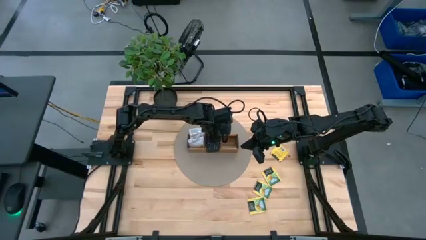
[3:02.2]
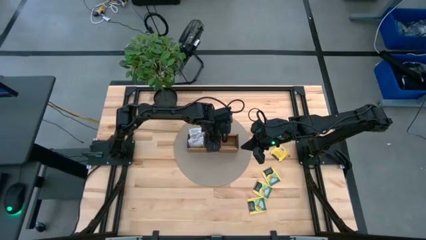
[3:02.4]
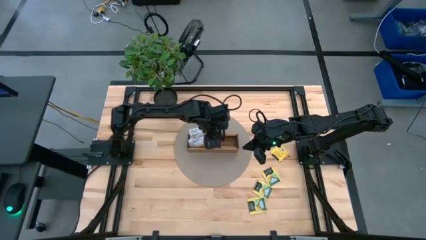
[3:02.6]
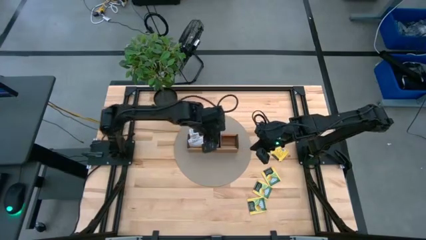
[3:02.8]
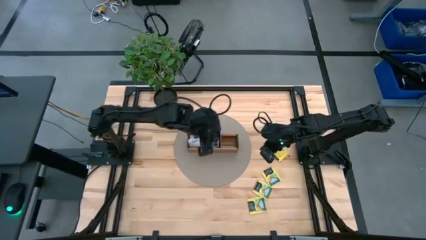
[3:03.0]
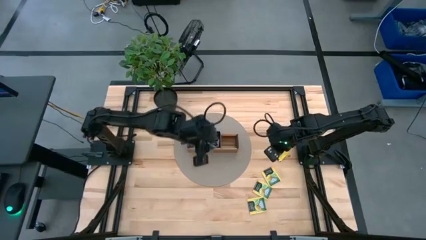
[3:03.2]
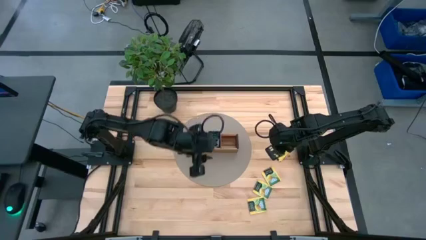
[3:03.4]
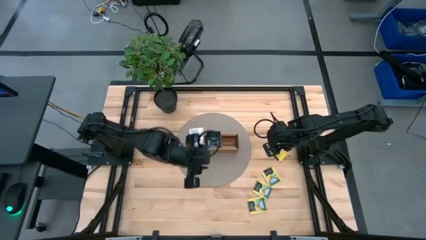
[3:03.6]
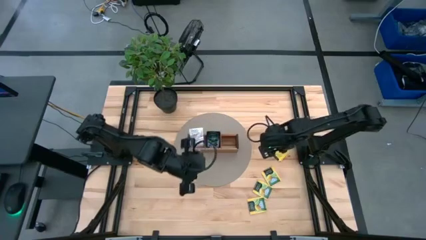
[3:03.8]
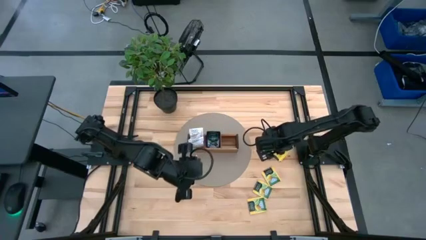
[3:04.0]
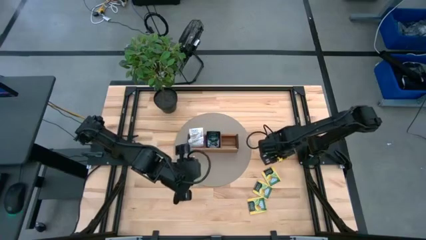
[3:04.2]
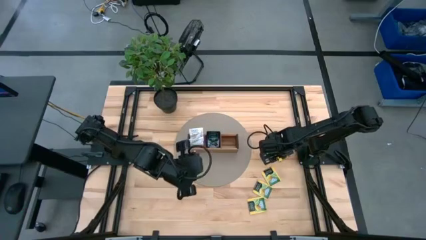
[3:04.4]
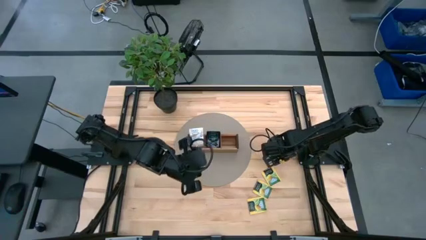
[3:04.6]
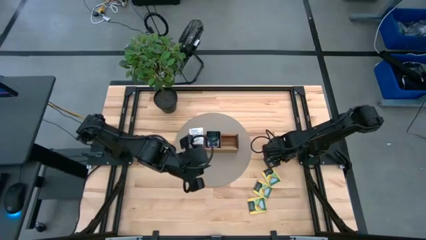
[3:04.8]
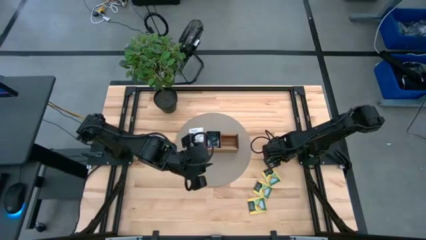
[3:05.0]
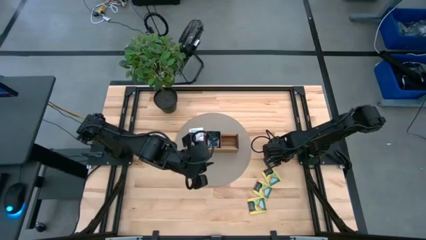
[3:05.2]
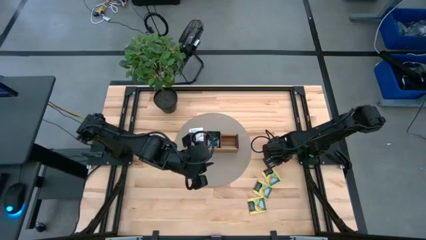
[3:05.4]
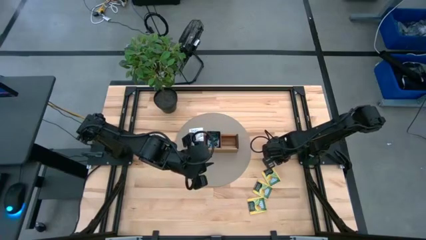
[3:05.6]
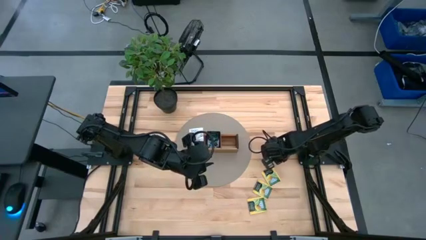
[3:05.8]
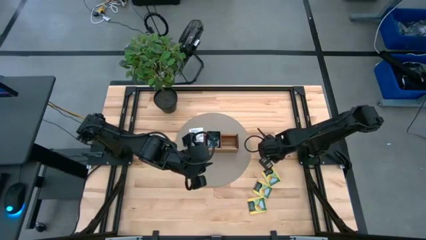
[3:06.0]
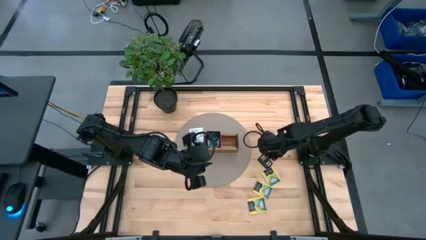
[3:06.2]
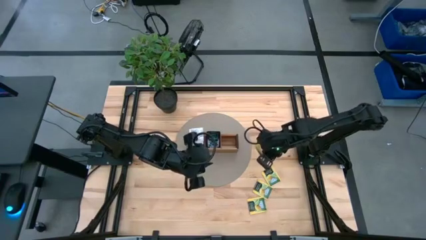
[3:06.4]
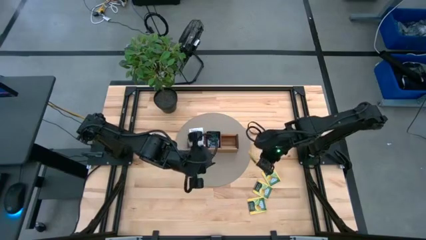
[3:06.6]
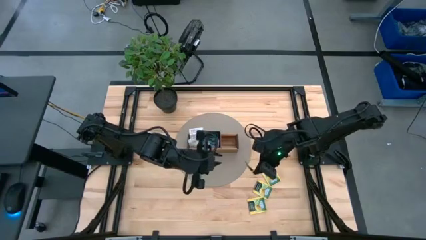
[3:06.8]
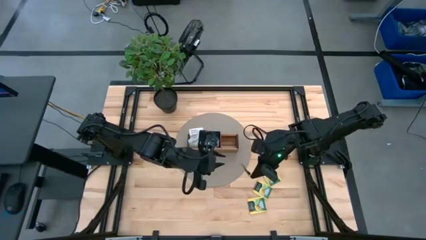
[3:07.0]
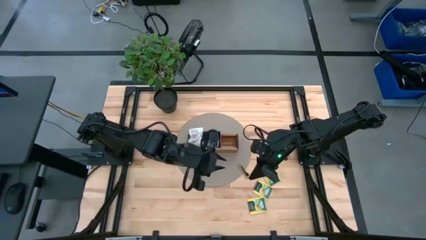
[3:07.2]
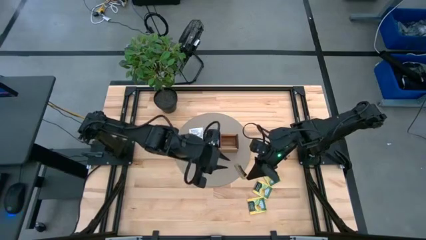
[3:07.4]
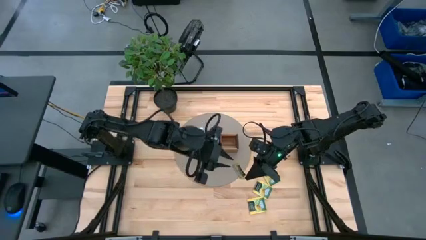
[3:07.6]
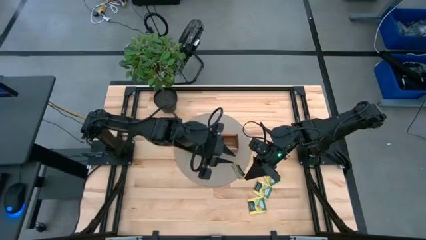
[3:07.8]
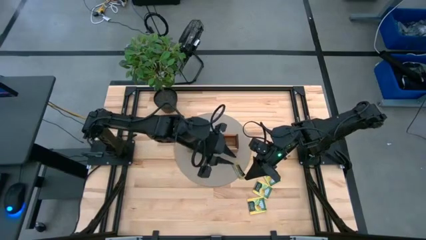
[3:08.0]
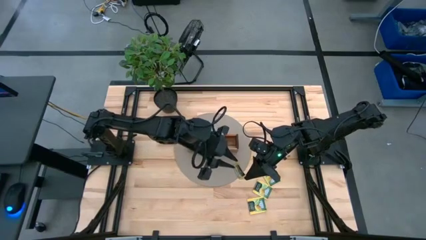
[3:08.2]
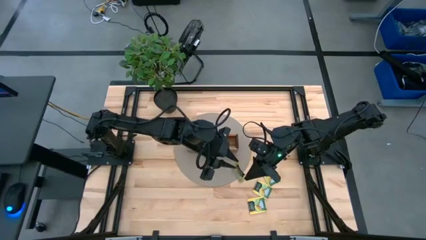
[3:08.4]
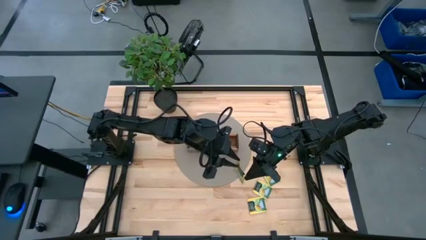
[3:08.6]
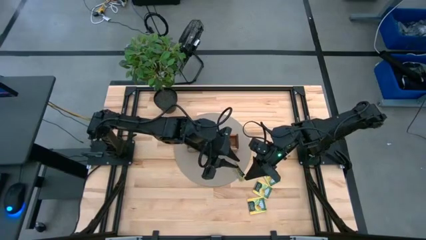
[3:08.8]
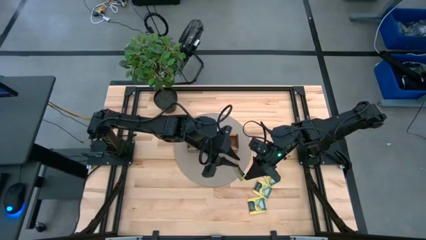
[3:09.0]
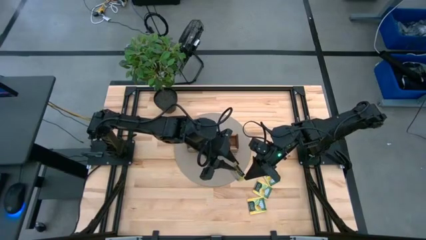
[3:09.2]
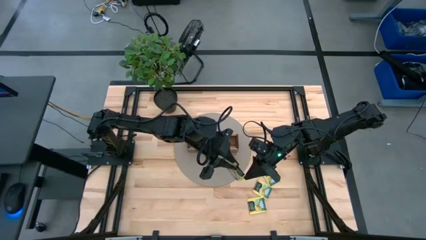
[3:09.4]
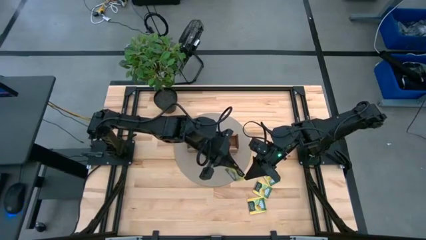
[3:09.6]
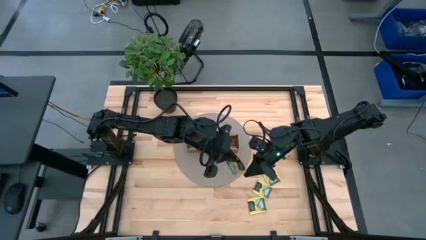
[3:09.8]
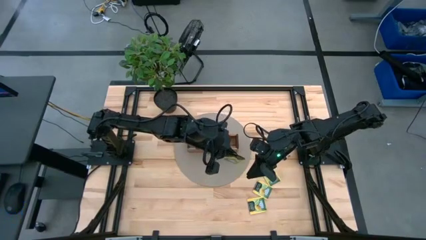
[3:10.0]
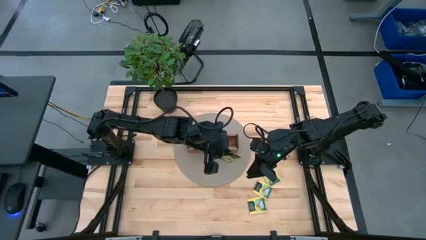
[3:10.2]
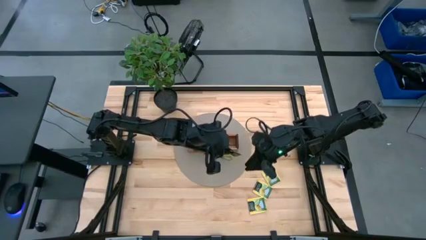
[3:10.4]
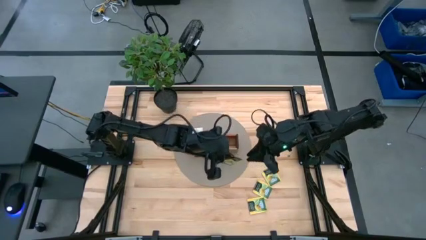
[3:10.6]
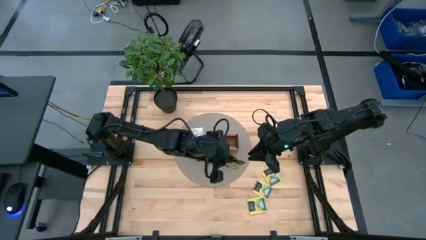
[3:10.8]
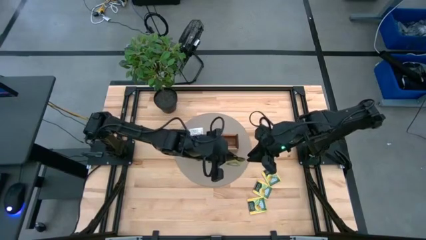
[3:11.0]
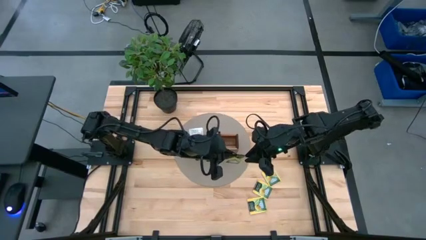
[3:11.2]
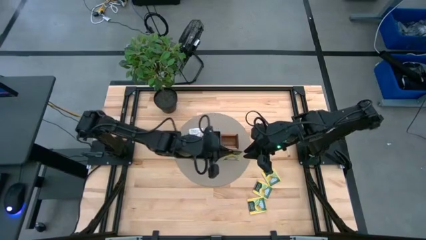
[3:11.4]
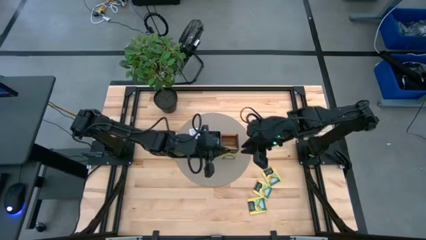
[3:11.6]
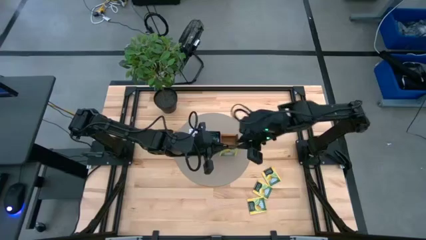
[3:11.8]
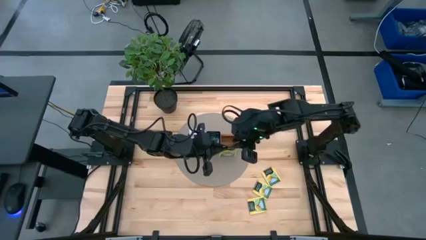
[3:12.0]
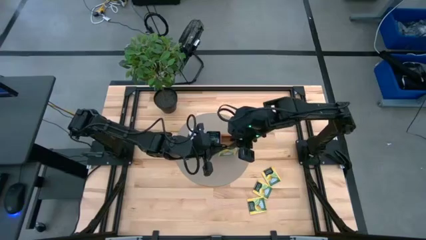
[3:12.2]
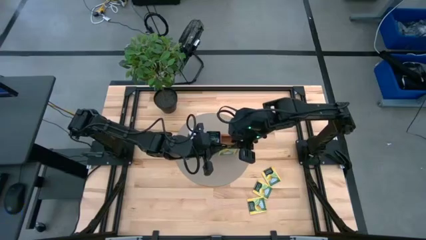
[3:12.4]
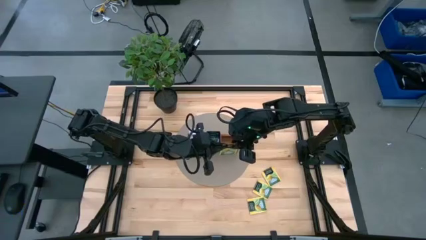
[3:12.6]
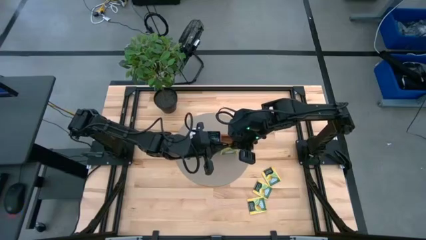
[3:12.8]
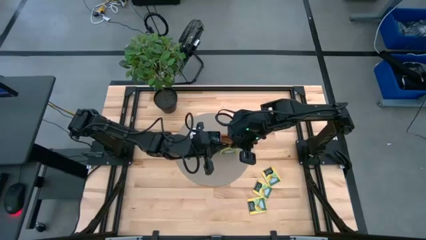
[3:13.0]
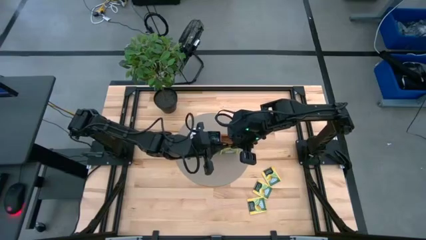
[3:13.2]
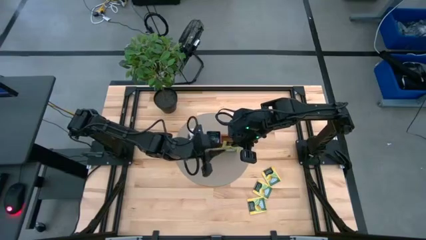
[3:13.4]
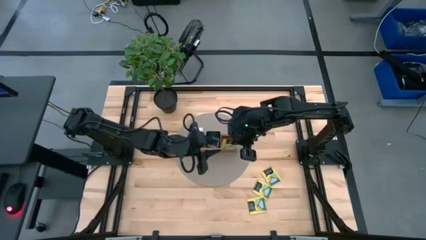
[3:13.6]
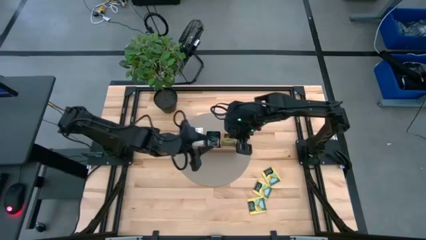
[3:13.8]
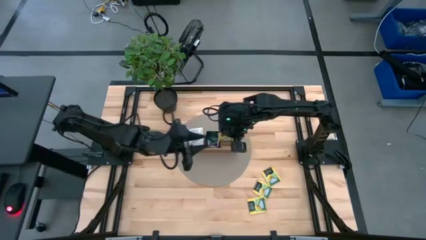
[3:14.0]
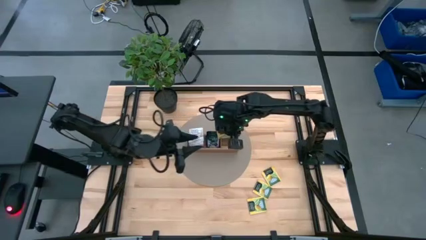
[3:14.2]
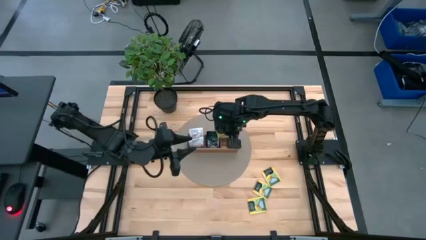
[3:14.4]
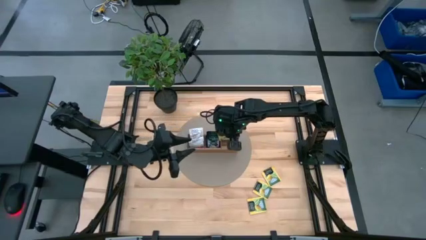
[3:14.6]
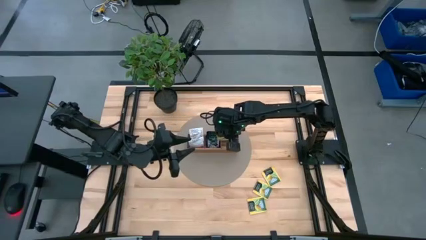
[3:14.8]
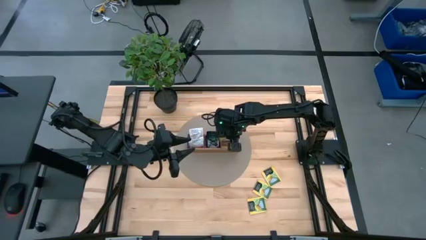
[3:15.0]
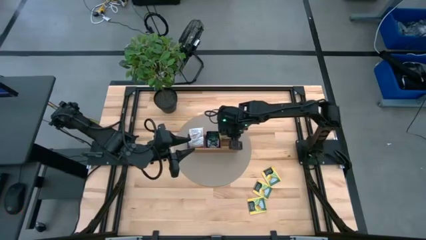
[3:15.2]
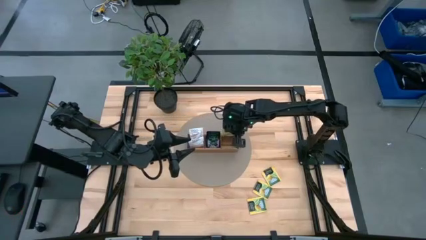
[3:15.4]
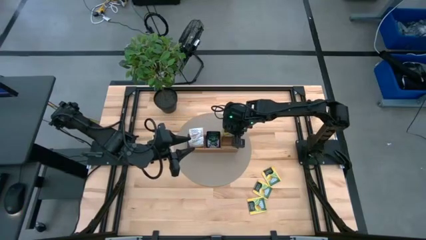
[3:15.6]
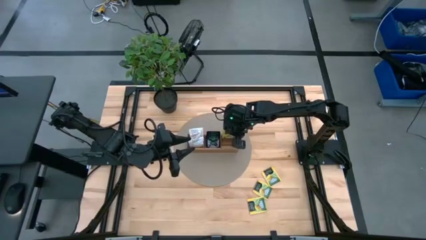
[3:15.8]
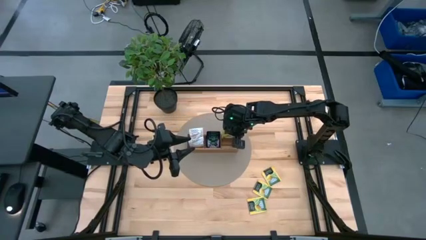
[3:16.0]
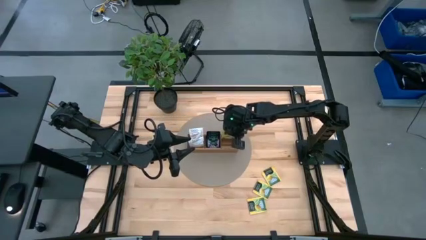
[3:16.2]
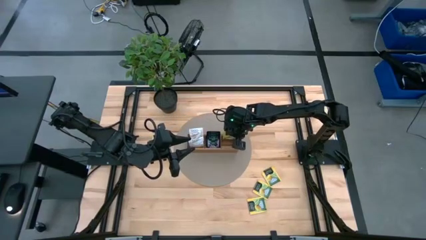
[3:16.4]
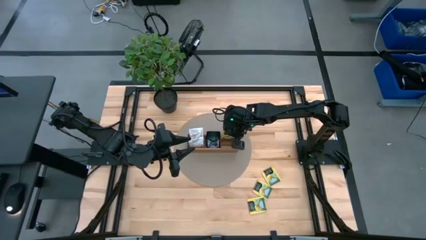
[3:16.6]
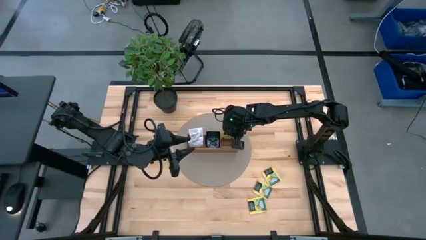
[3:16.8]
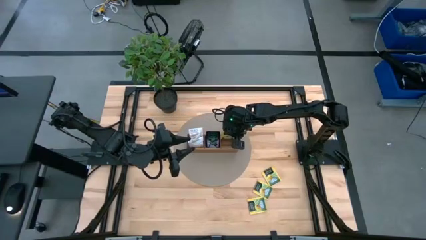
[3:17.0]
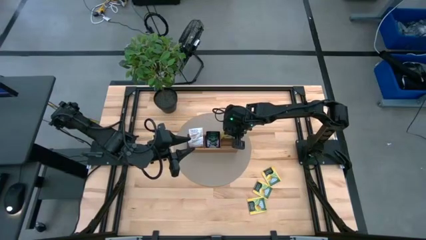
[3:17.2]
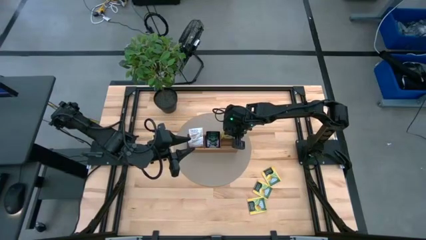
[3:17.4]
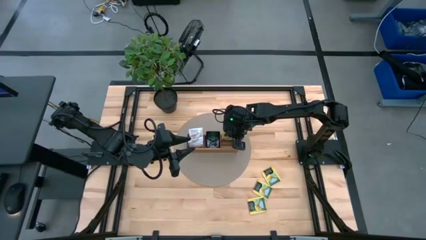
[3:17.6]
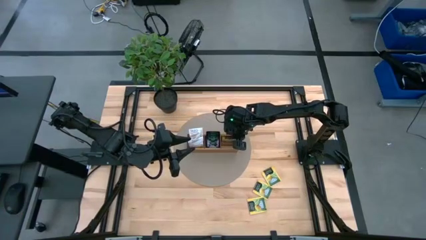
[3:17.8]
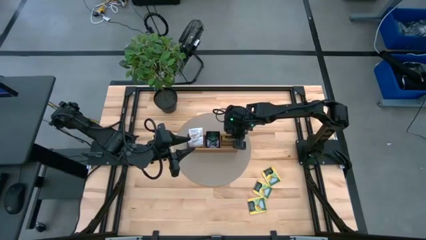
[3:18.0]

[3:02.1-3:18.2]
Task: Pick & Place Tea
Put the yellow tea bag into the right section of the wooden organizer
